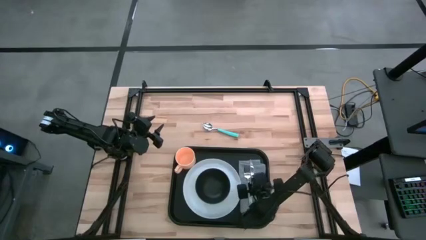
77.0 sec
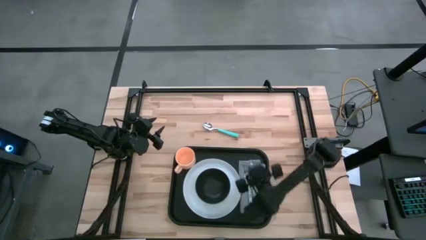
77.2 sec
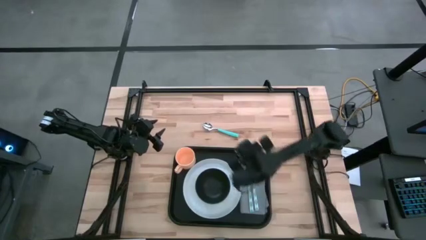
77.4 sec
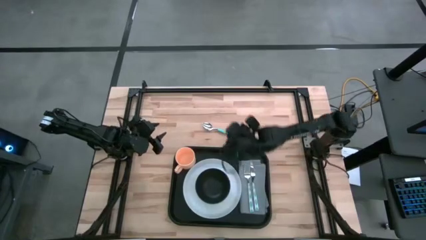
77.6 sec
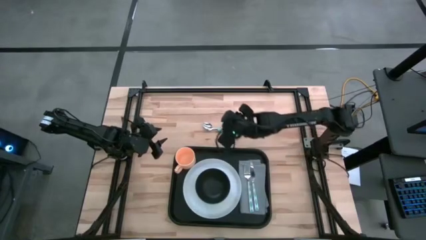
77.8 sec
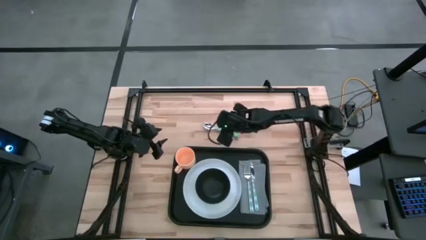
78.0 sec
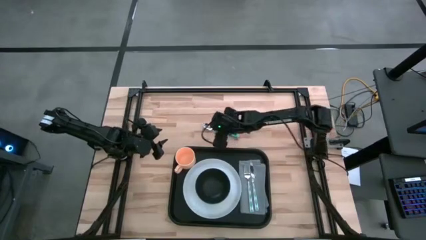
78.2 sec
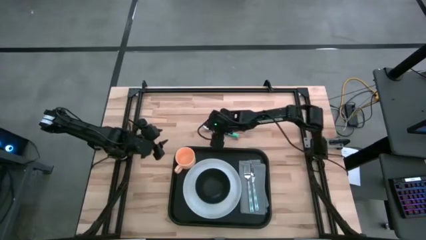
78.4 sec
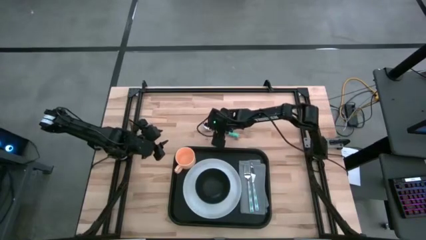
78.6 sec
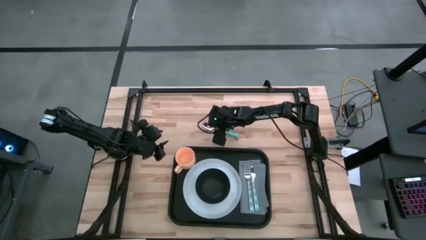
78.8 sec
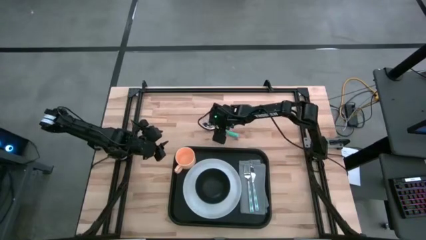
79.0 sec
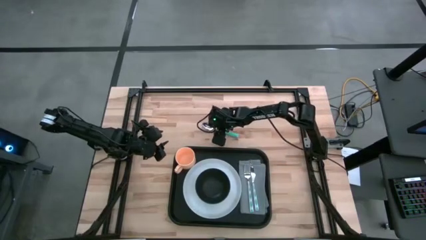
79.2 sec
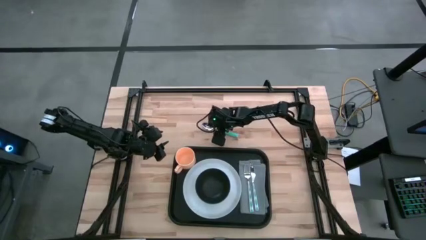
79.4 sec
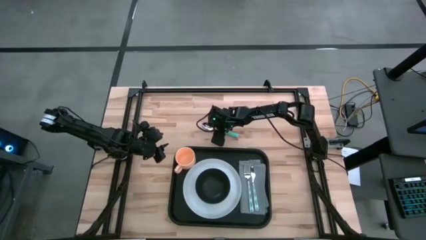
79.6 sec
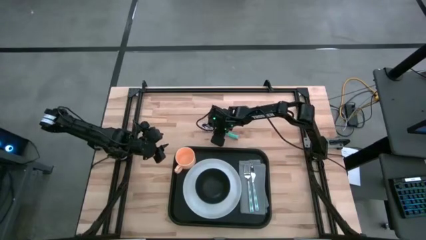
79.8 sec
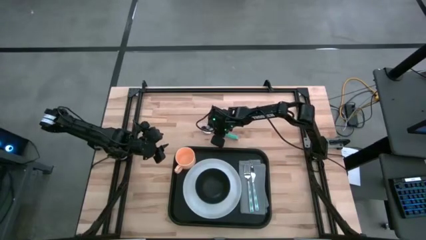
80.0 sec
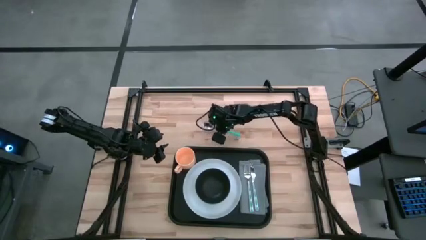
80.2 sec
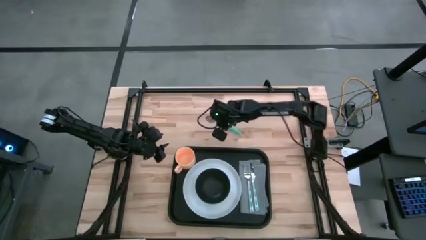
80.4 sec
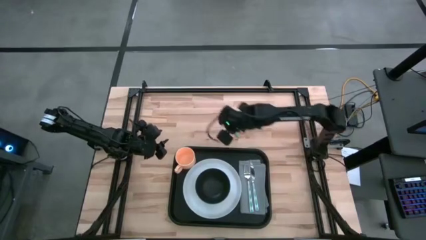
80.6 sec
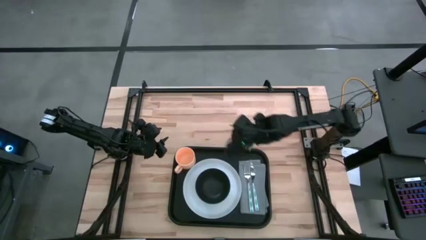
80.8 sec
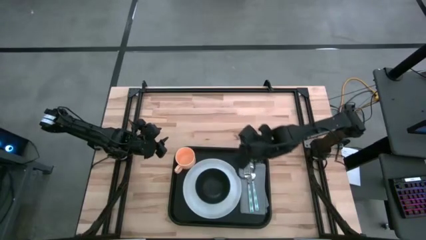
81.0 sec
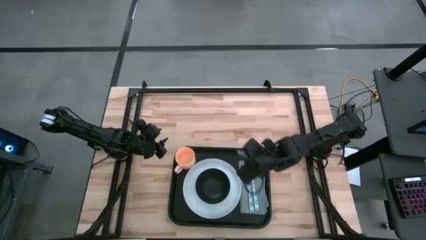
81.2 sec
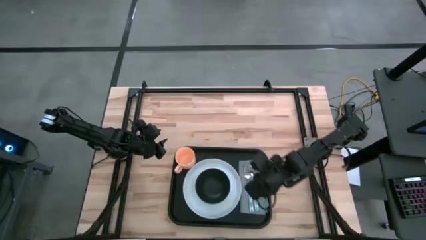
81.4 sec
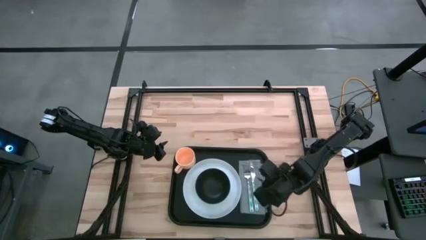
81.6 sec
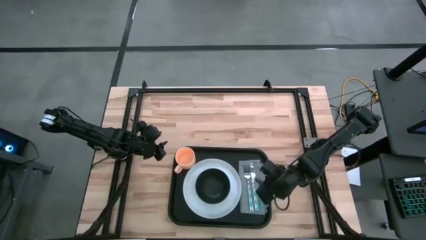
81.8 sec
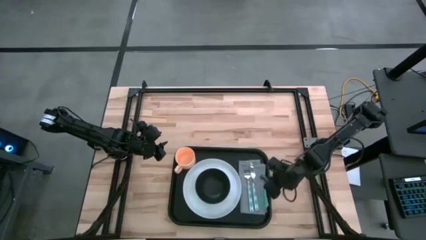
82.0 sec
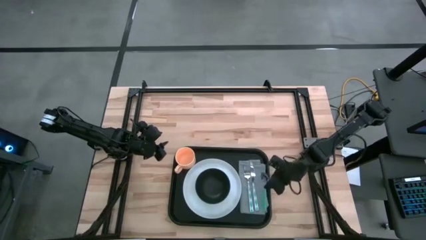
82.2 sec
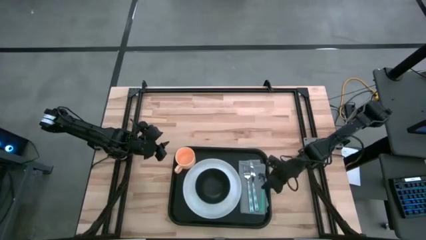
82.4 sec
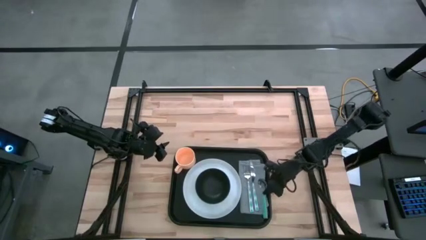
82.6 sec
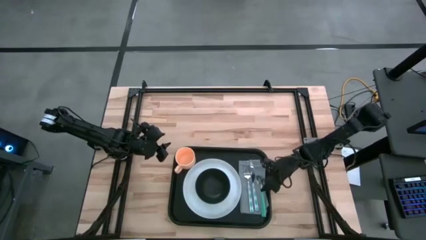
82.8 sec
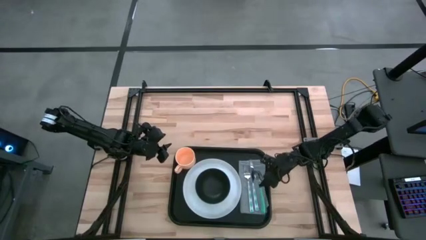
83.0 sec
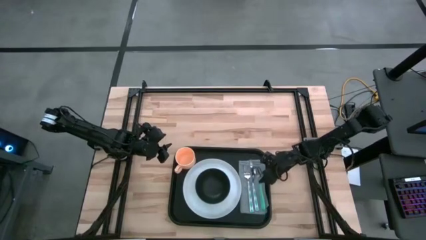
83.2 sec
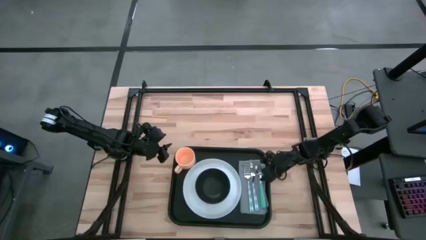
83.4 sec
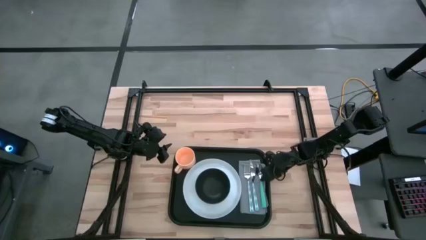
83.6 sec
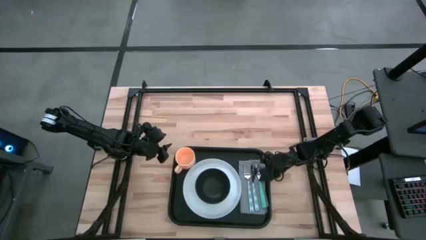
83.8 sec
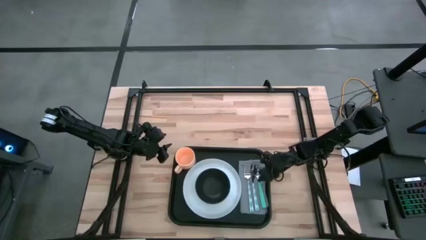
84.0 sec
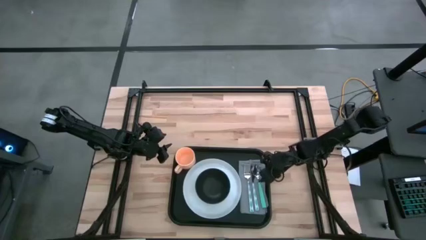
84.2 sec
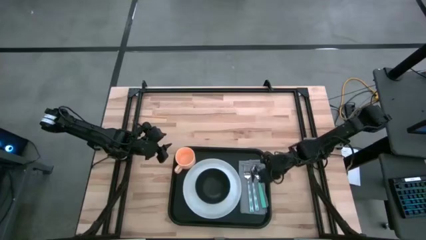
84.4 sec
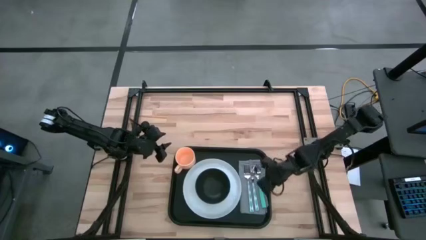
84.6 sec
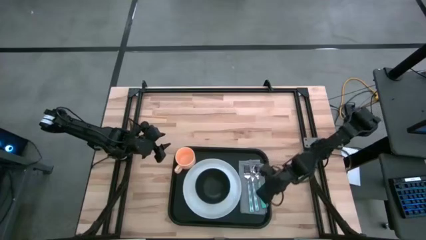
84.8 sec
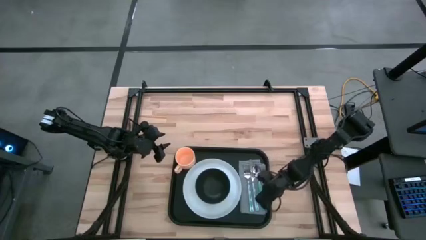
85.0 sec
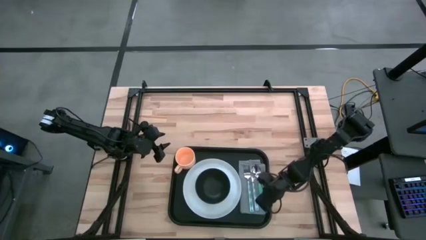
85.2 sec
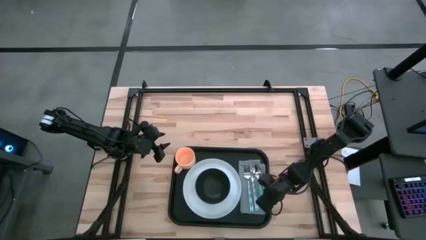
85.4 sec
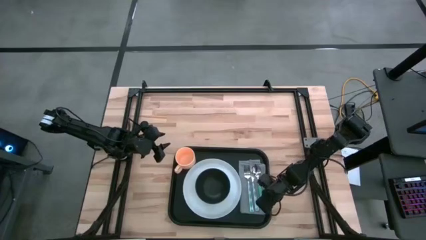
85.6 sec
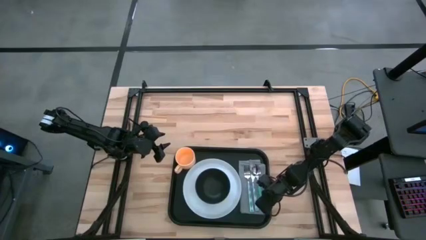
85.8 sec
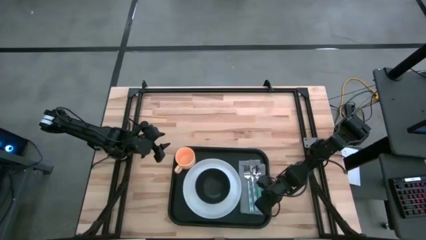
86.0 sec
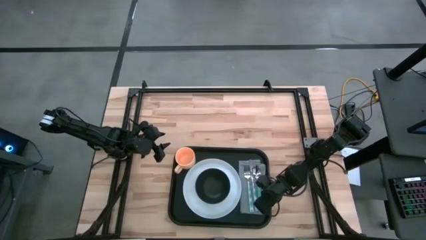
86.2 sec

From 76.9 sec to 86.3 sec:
Task: Set up tray
Put the blue spoon on the gray napkin to the right of the blue knife on the black tray

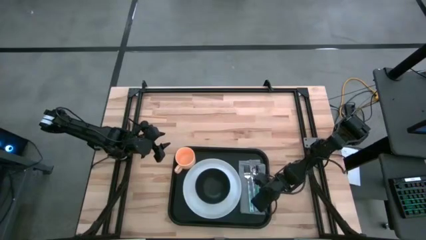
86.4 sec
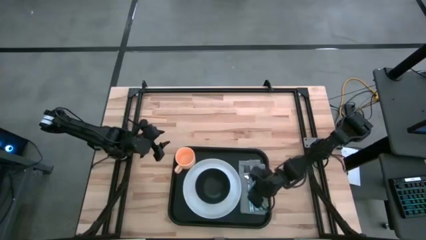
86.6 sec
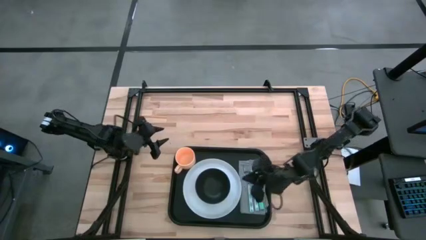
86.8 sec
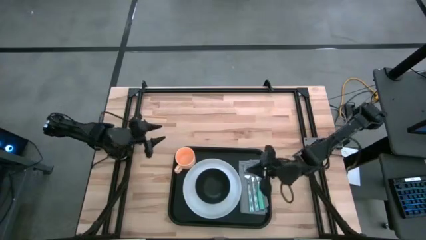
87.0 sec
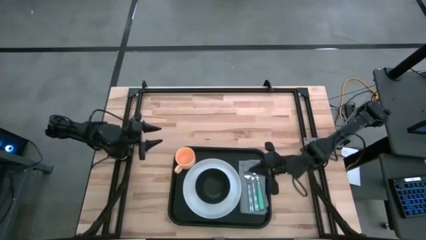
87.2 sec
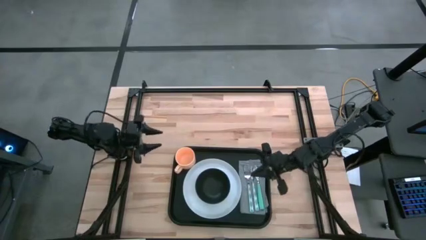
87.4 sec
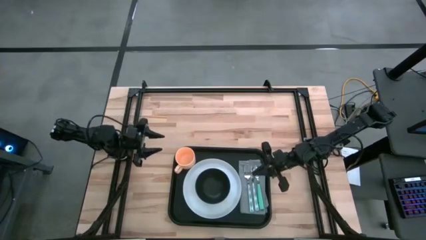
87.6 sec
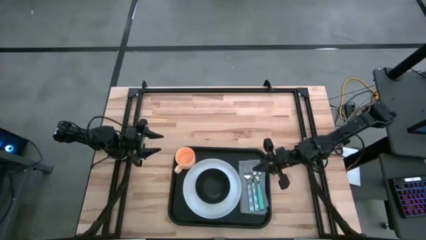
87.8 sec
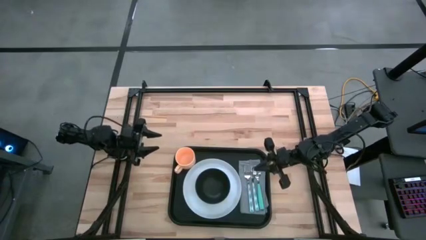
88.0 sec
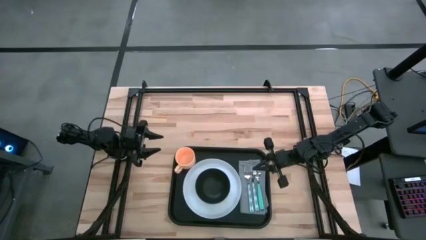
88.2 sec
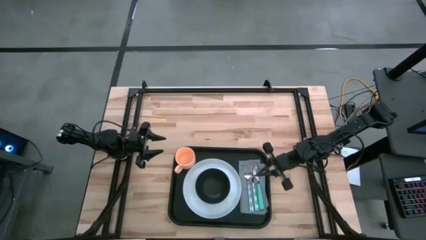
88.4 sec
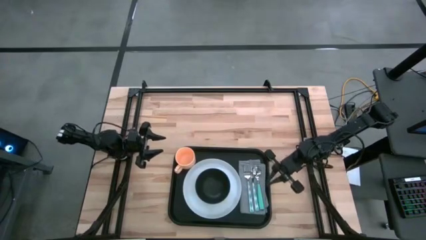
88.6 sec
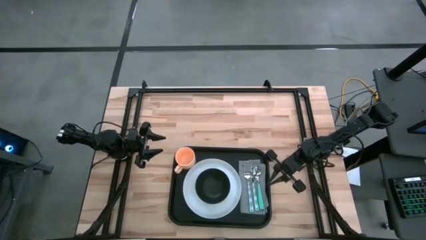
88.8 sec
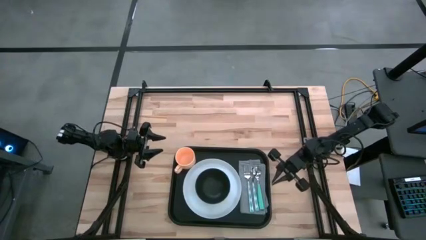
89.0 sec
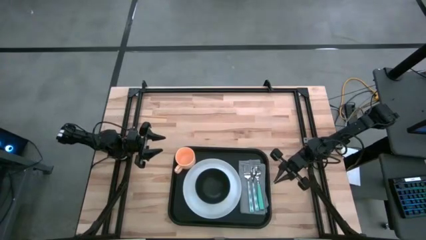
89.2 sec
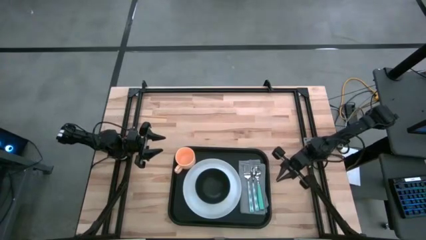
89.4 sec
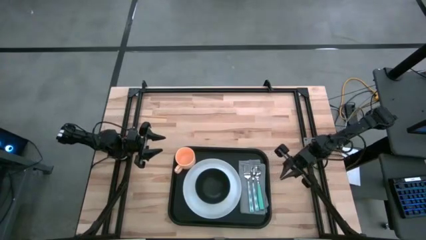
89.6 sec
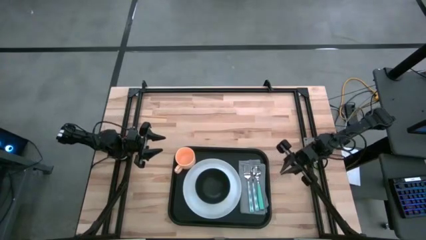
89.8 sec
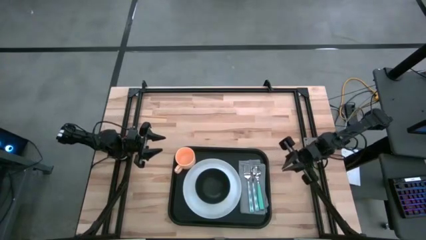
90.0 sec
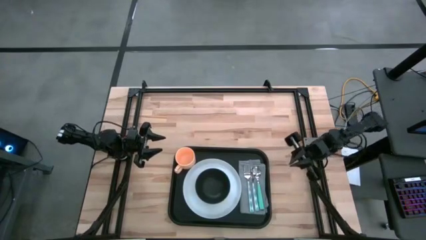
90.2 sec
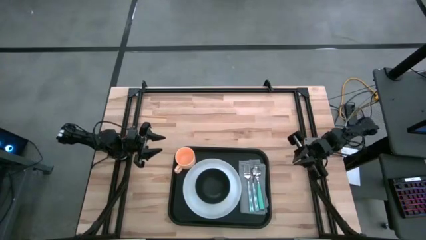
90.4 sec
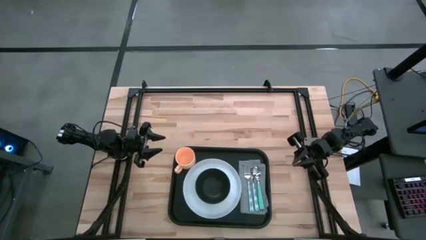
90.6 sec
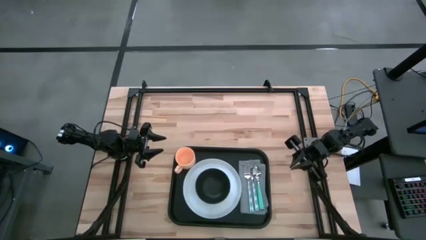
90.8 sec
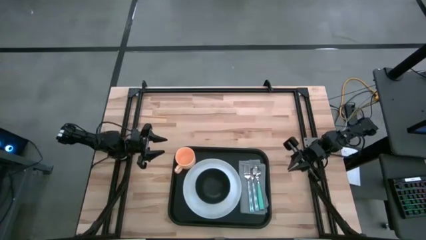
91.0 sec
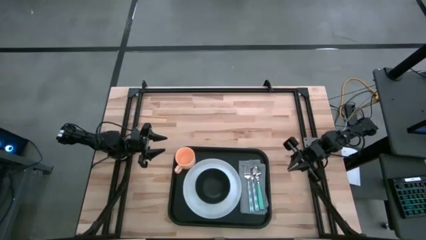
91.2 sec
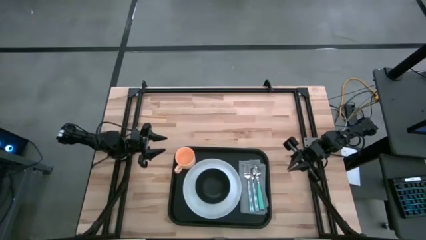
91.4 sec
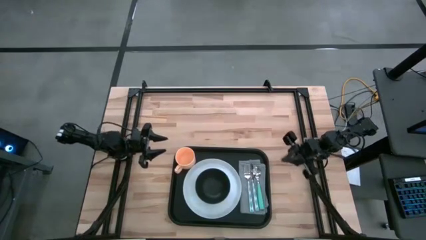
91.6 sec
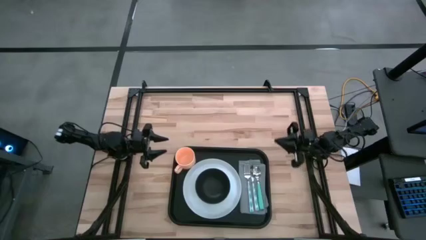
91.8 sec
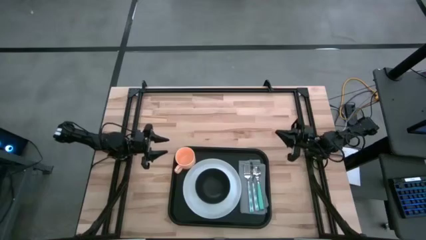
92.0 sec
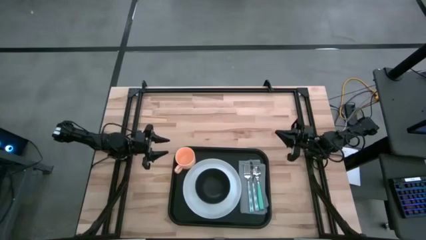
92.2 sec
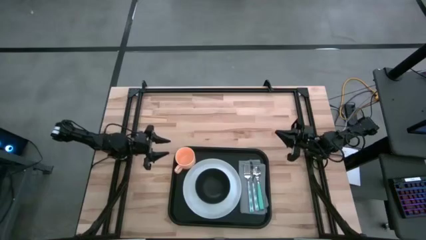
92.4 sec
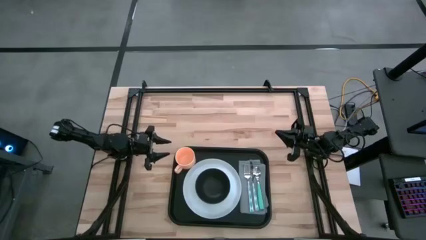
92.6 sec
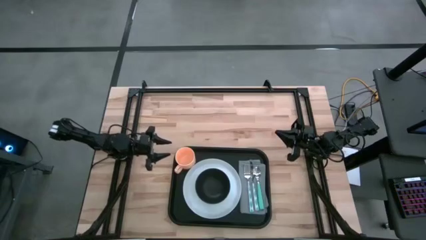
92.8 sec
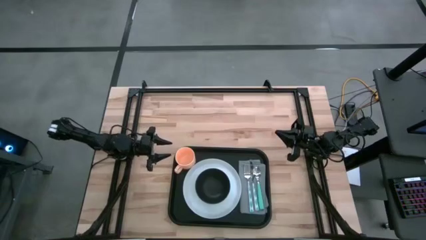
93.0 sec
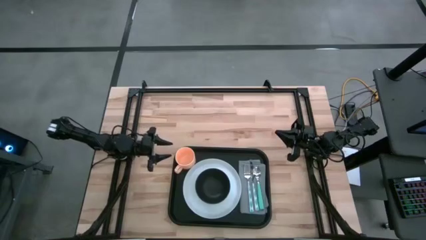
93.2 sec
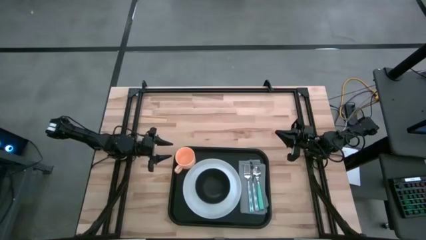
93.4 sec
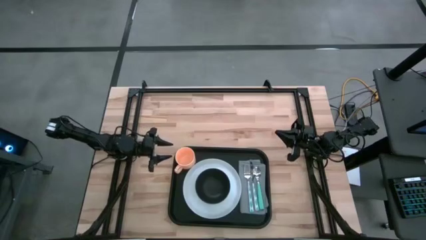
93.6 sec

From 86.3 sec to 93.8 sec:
Return to Home Position
